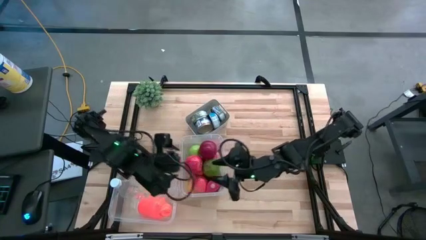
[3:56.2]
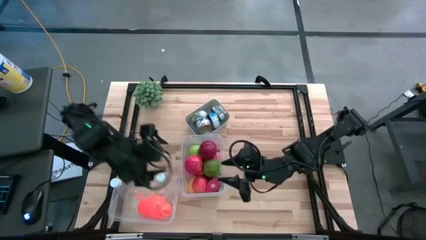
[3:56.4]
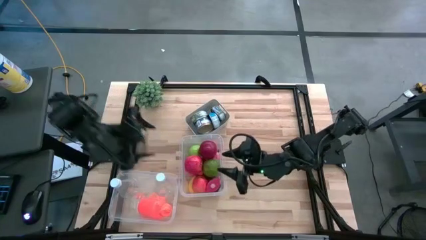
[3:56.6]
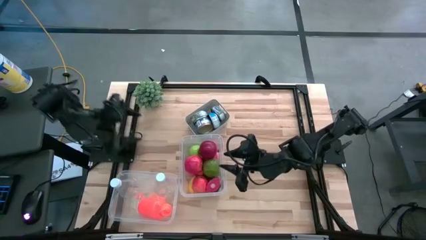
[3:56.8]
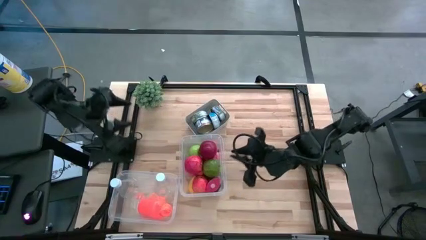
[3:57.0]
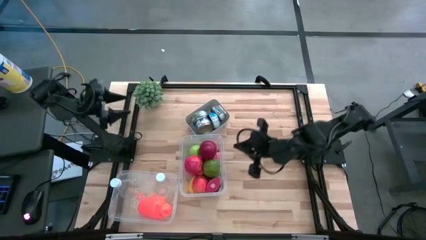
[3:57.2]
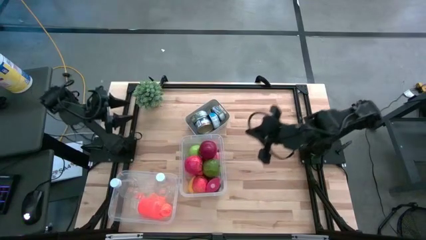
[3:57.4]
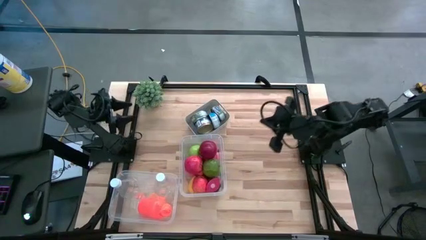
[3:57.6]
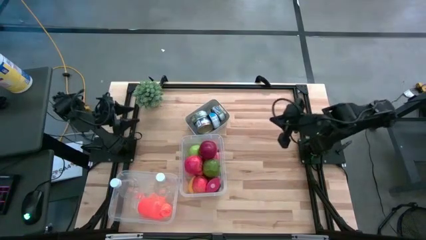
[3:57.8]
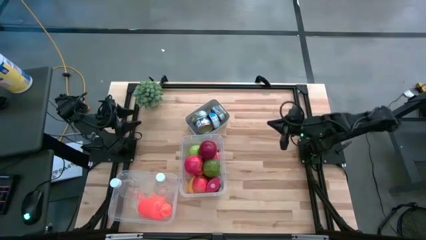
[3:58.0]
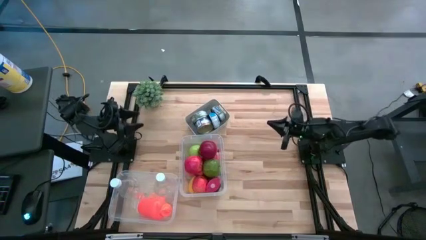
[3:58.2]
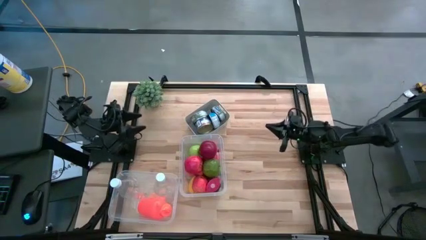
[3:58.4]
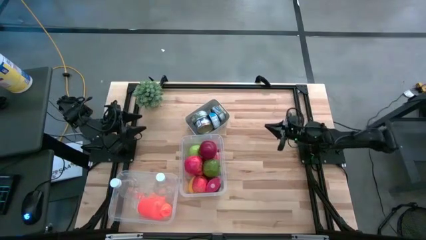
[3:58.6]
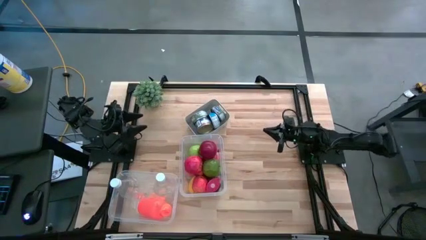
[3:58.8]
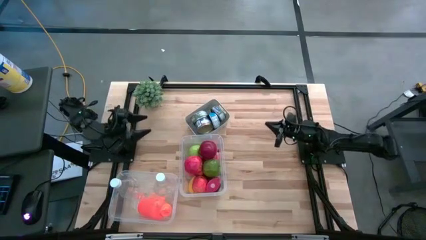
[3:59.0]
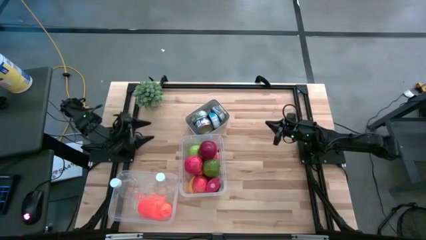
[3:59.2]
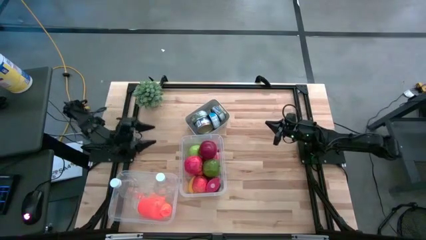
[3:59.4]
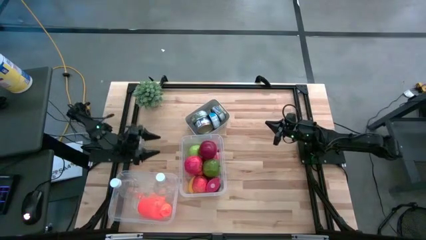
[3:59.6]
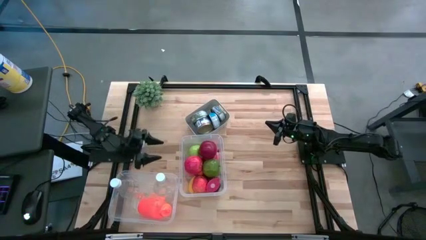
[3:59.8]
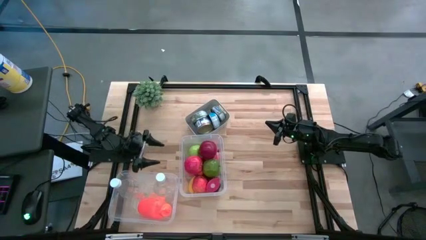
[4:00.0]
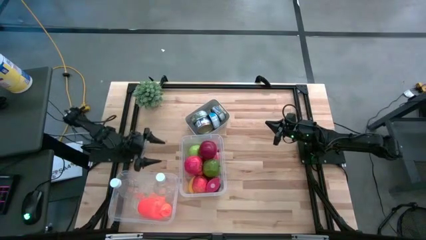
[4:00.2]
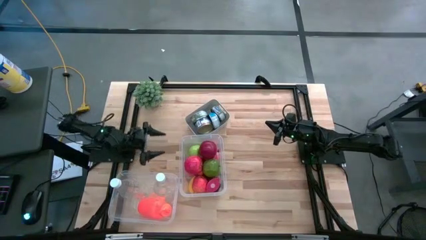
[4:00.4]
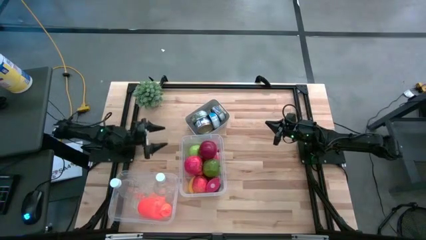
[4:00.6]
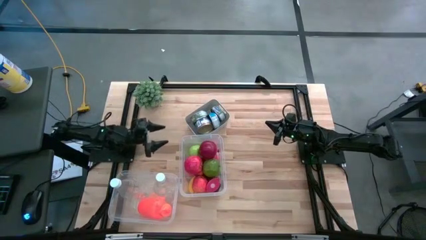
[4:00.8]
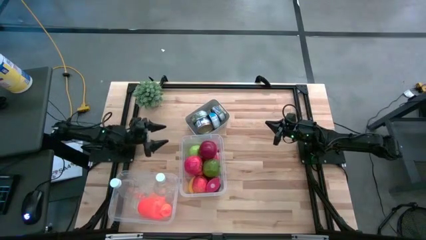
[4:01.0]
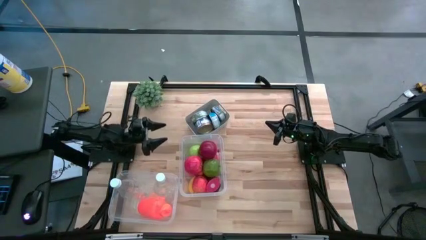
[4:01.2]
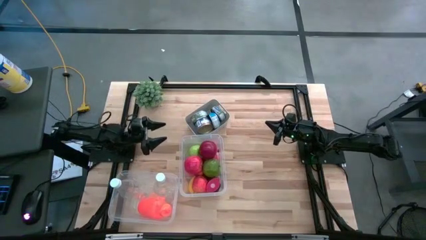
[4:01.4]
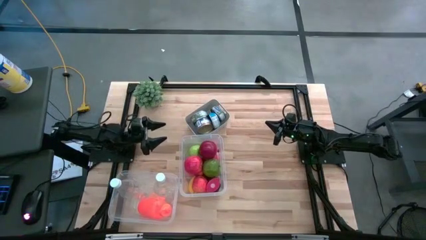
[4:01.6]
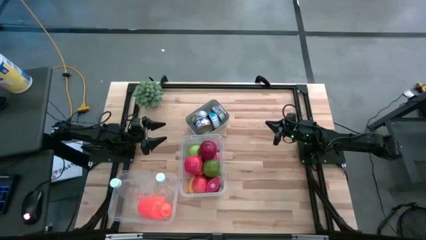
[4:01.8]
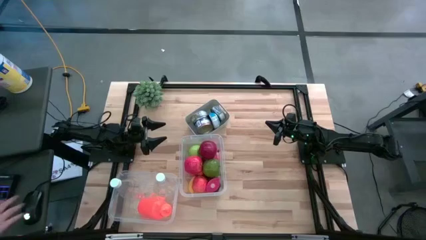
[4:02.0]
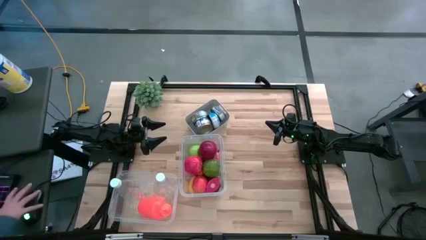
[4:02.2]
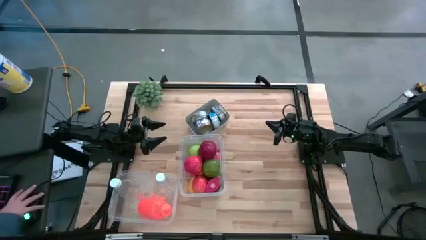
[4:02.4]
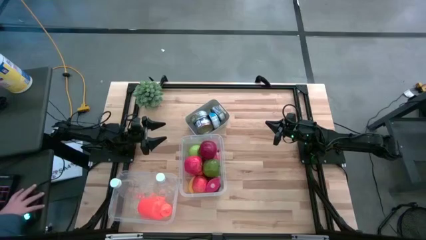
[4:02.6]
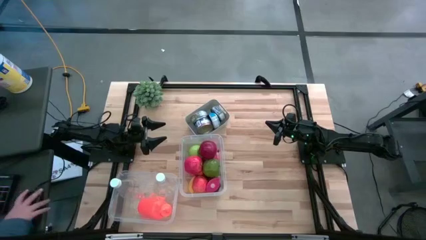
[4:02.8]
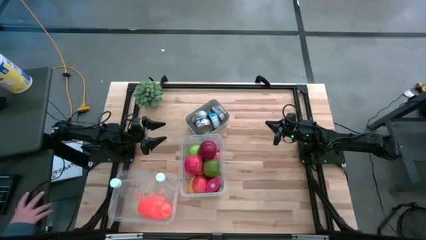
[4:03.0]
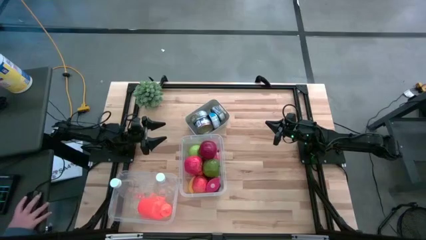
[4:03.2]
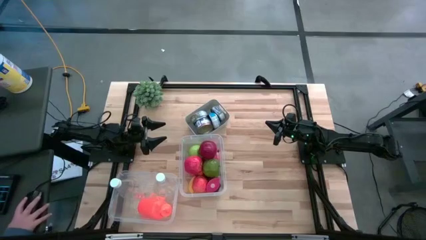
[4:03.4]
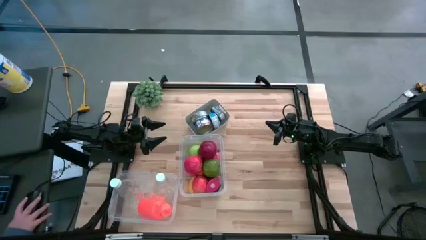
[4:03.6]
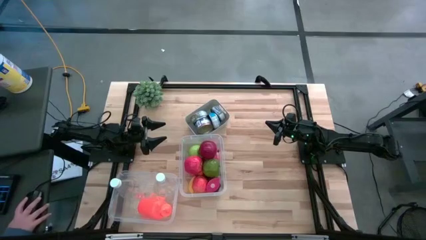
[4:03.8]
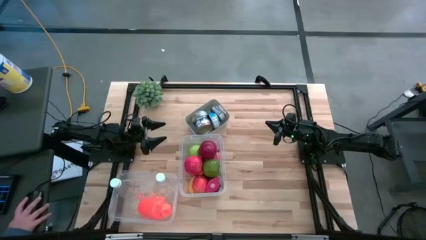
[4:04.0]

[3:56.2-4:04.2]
Task: Pick & Place Food Item
Return to Home Position

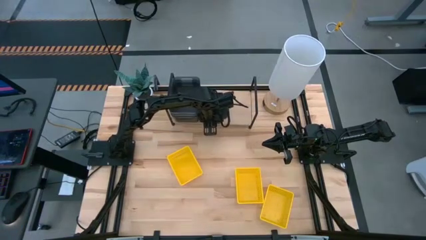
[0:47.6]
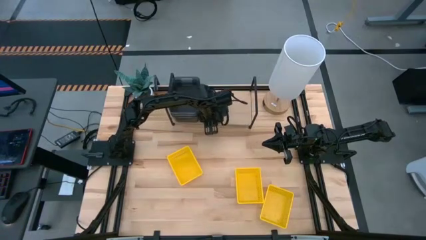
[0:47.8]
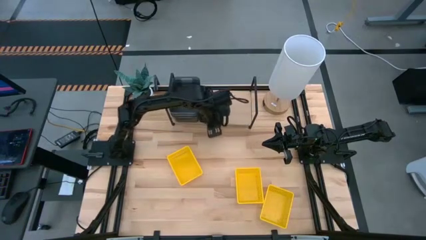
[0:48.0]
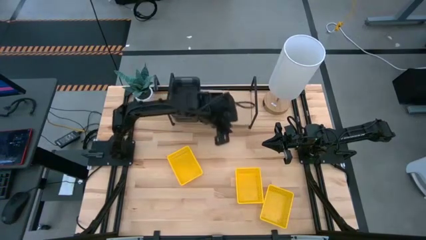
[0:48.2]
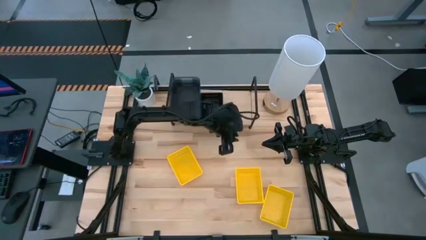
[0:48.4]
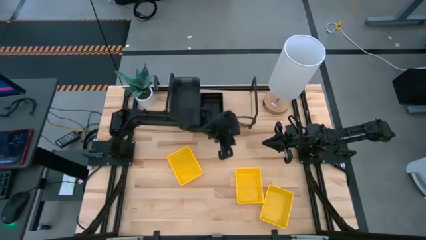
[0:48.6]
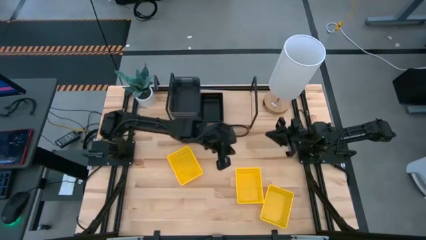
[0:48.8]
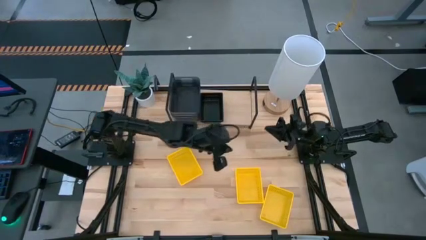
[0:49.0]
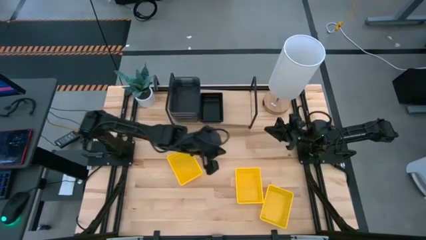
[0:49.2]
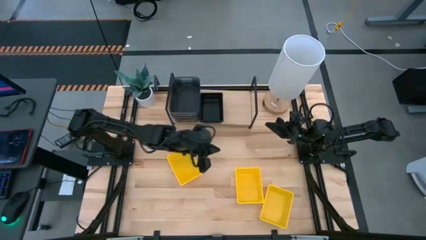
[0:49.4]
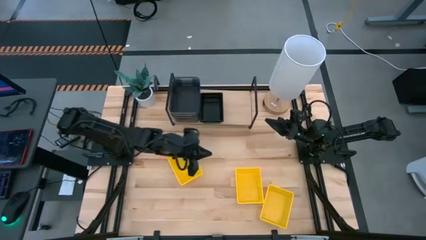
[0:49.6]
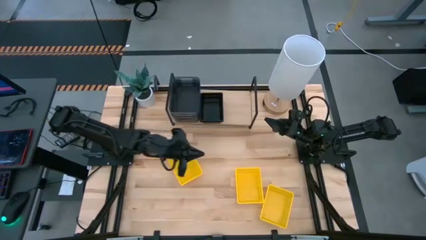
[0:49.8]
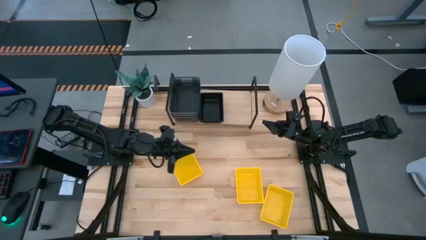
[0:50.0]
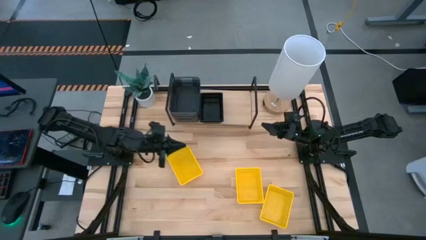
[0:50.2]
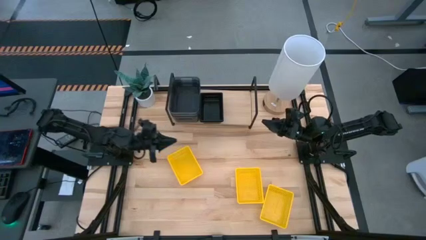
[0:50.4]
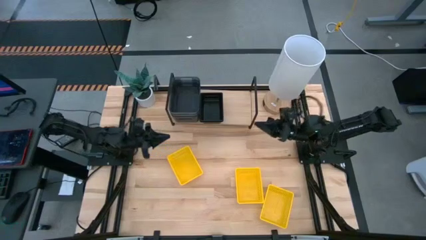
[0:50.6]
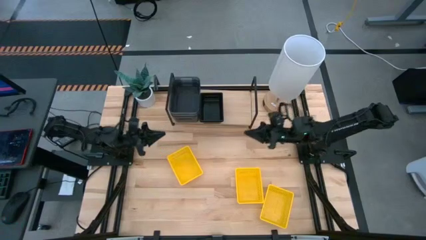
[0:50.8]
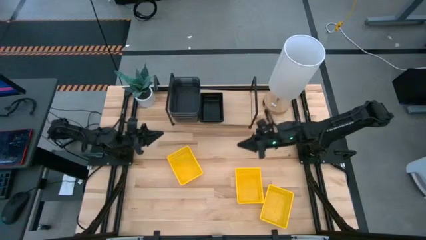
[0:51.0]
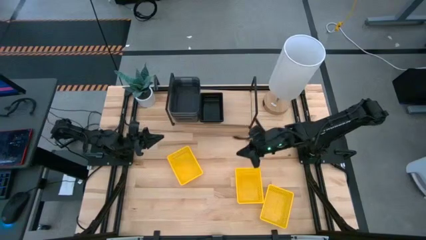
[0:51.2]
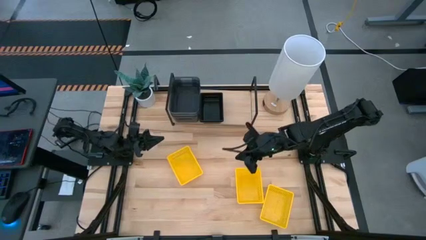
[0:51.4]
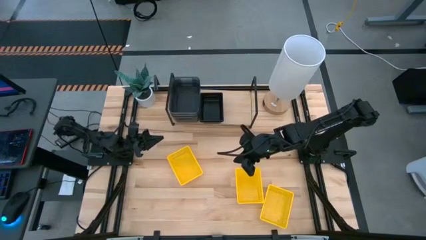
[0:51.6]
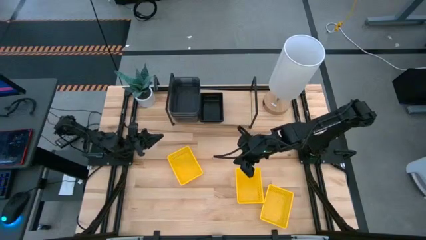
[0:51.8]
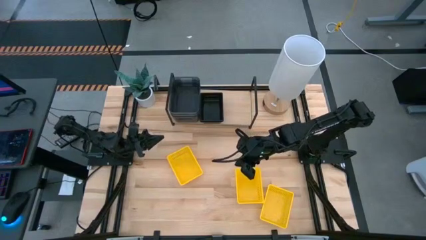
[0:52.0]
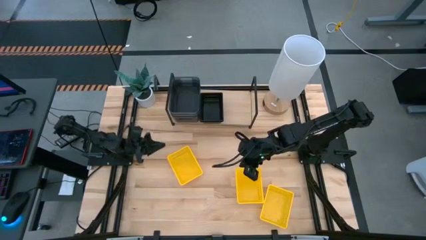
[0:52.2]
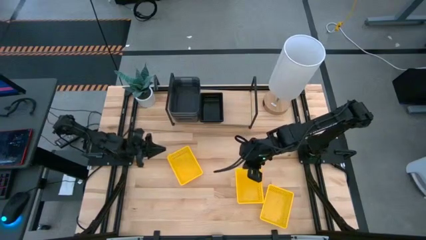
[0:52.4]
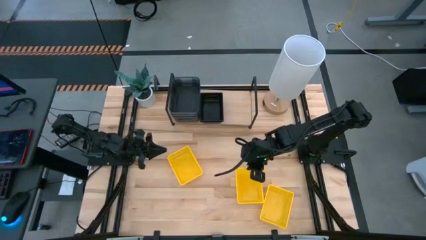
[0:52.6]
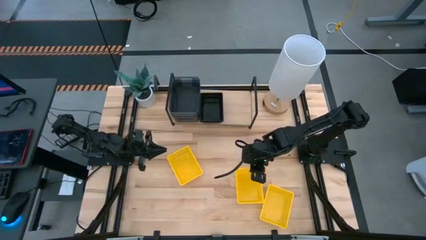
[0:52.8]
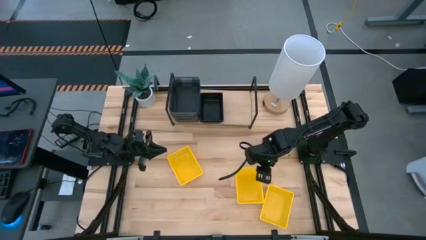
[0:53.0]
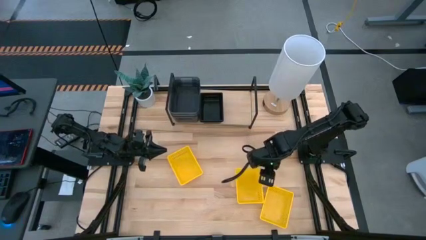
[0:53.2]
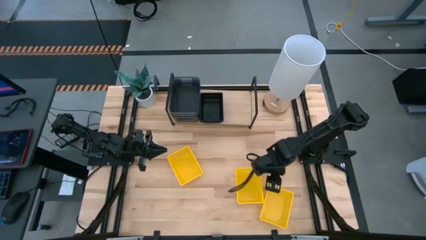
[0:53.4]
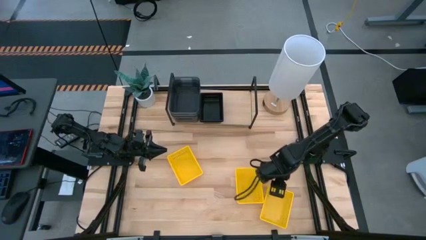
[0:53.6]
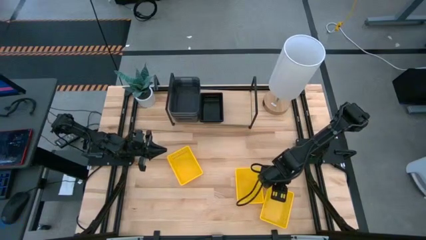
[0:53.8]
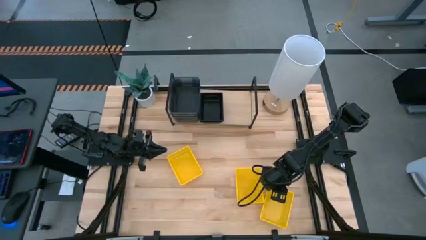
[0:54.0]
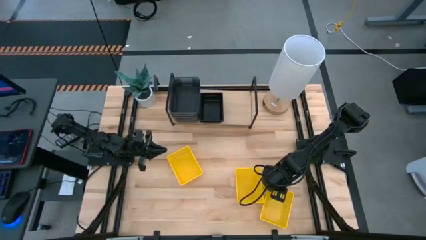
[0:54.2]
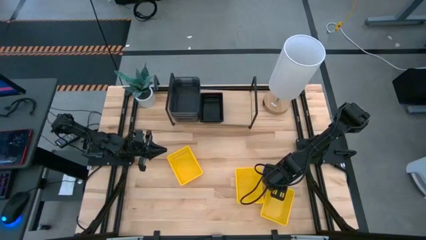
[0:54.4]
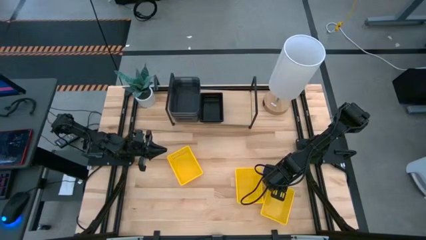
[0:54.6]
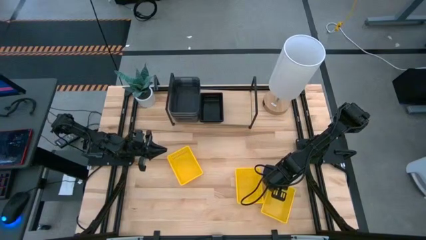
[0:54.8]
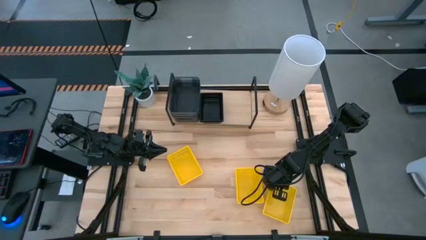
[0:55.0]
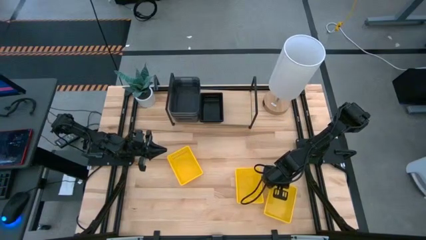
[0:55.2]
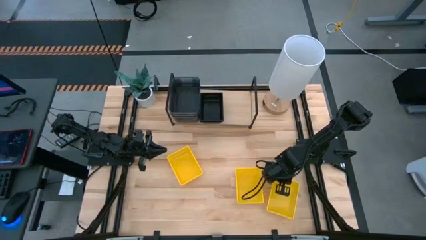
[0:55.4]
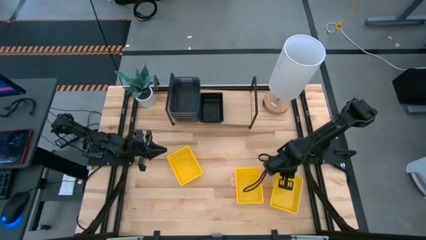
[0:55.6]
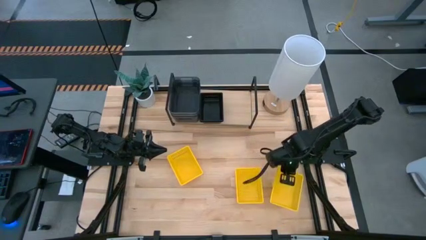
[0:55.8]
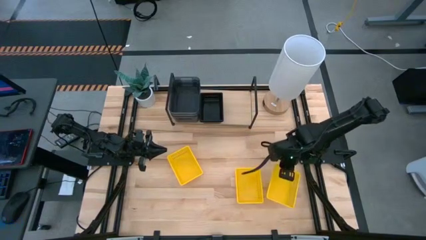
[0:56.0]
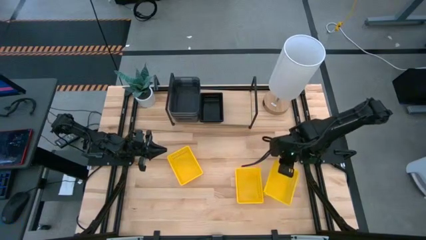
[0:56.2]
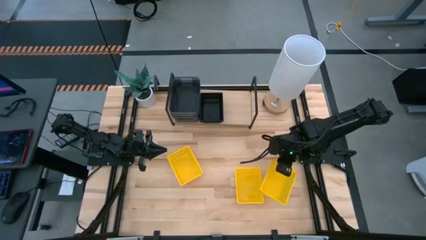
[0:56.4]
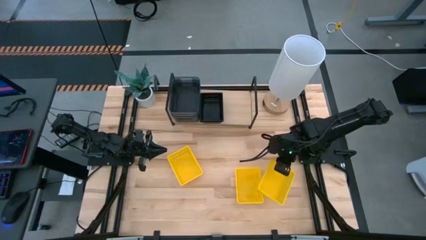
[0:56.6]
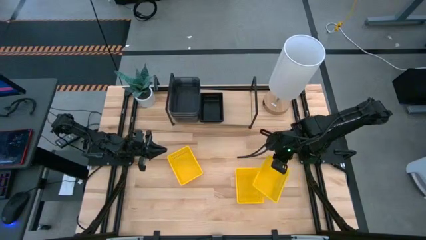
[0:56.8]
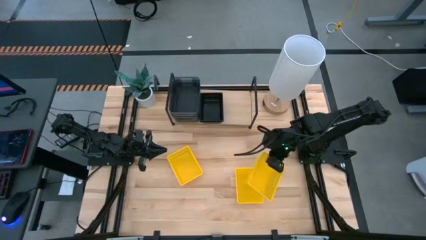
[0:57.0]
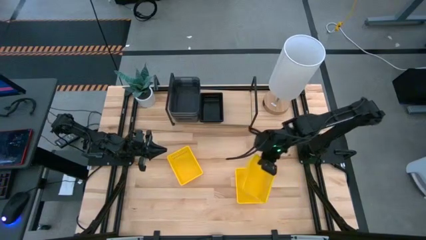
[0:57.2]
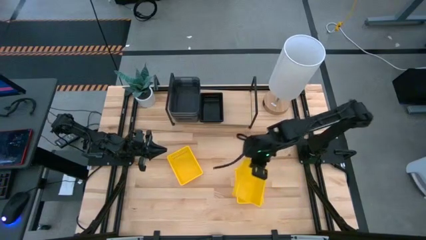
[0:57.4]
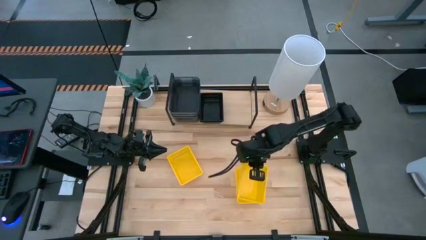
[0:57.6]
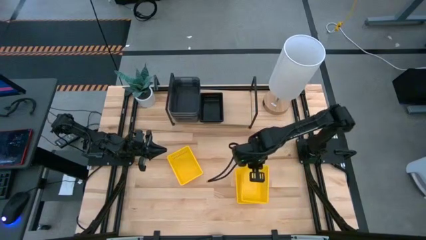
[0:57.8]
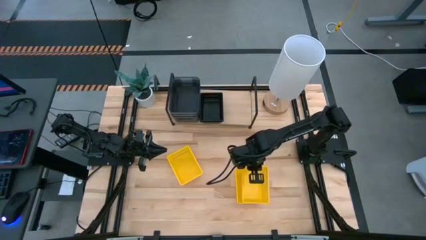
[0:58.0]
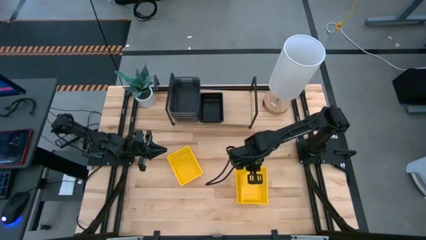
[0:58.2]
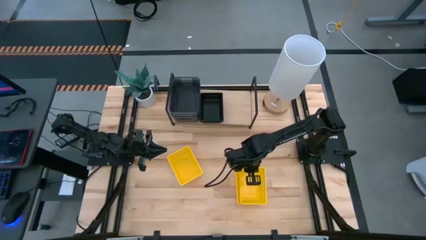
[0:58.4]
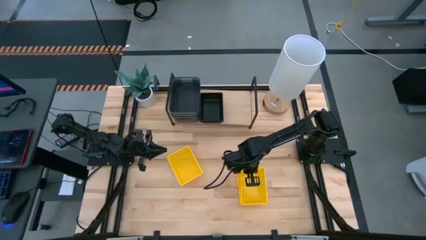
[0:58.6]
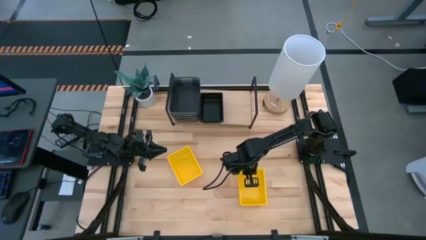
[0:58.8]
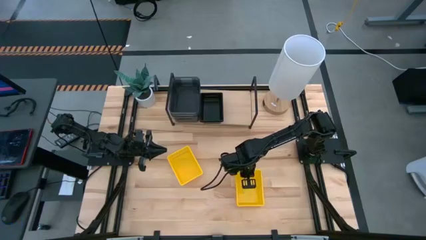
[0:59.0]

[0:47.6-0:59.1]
Task: Stack baskets on shelf by color
Stack the right yellow basket on top of the yellow middle basket
